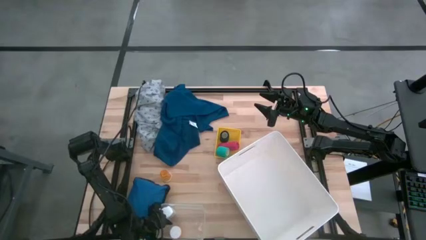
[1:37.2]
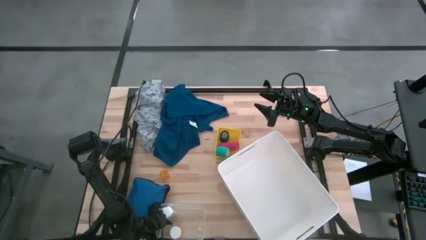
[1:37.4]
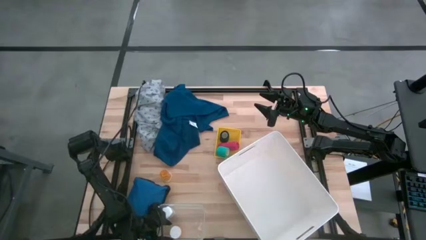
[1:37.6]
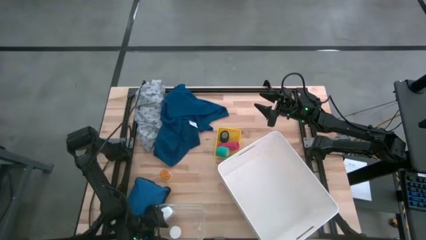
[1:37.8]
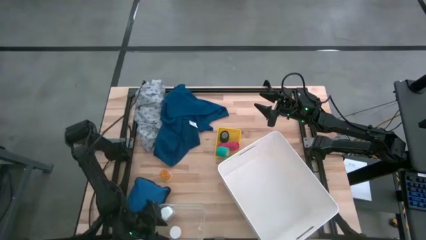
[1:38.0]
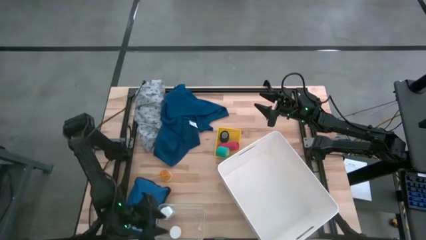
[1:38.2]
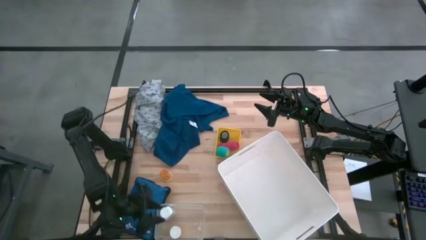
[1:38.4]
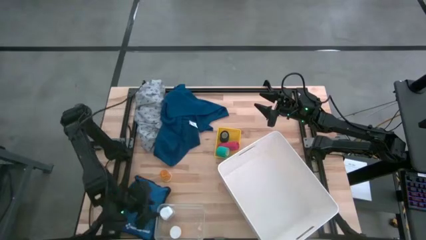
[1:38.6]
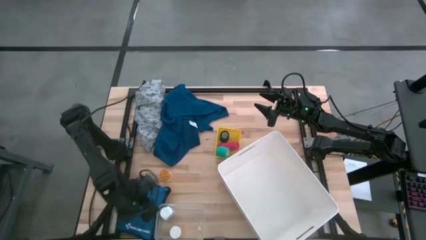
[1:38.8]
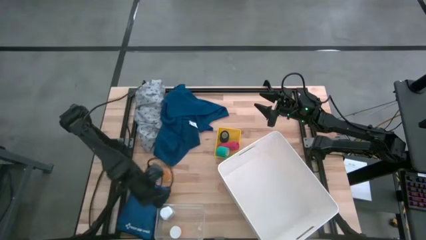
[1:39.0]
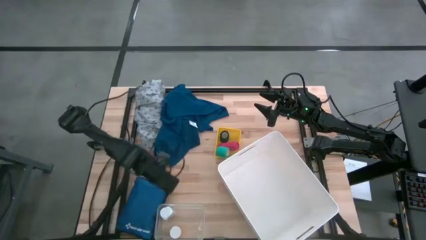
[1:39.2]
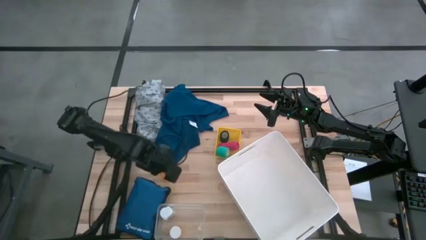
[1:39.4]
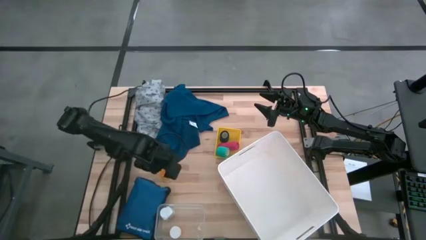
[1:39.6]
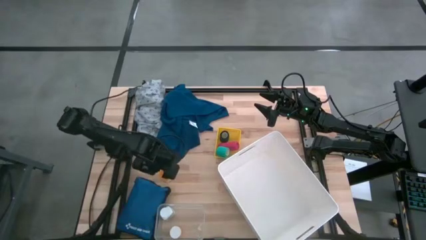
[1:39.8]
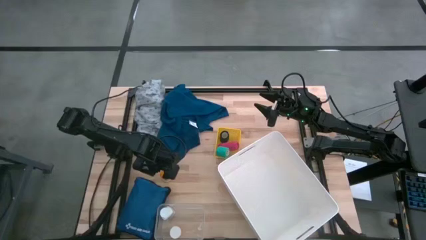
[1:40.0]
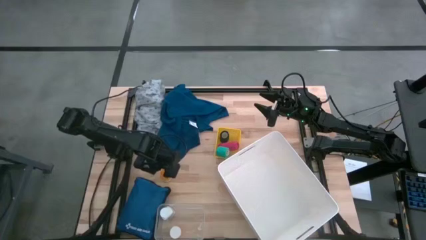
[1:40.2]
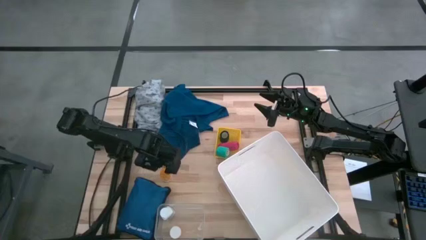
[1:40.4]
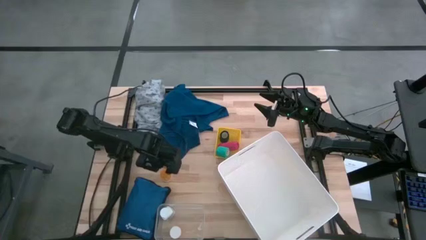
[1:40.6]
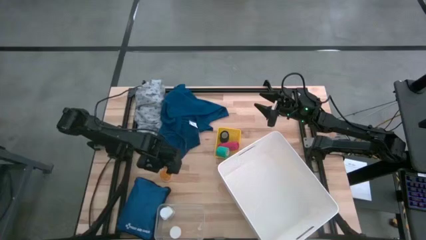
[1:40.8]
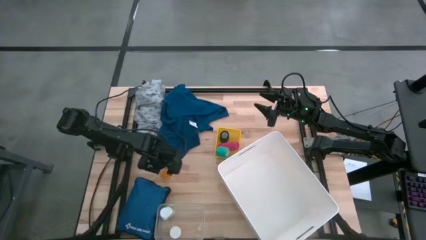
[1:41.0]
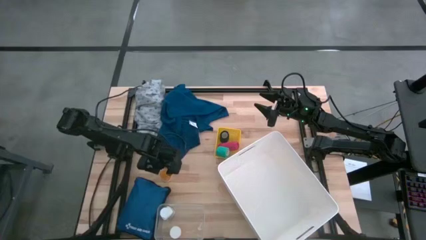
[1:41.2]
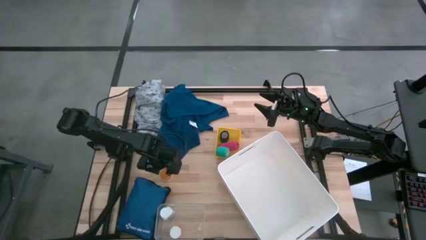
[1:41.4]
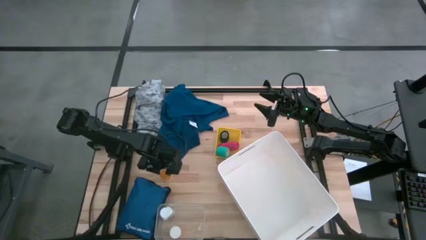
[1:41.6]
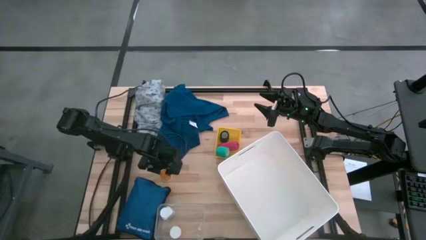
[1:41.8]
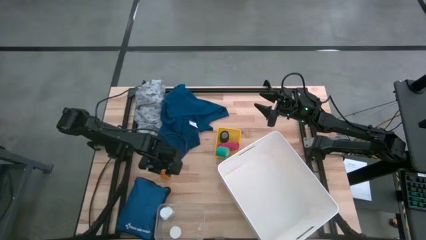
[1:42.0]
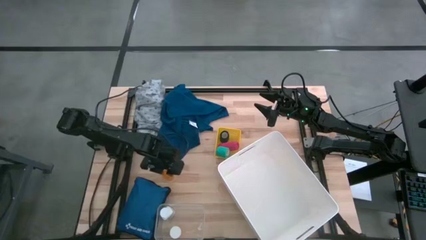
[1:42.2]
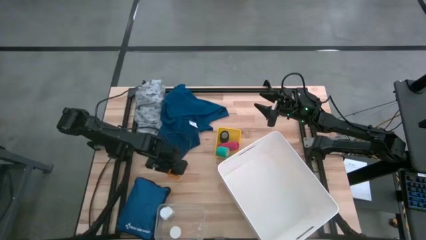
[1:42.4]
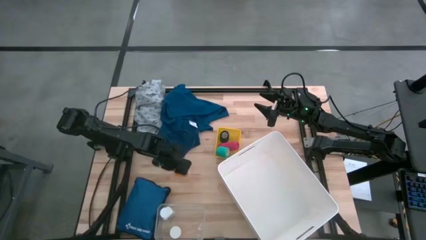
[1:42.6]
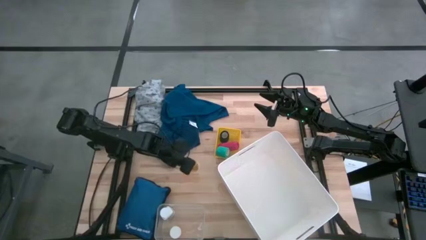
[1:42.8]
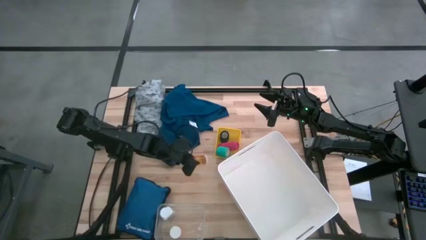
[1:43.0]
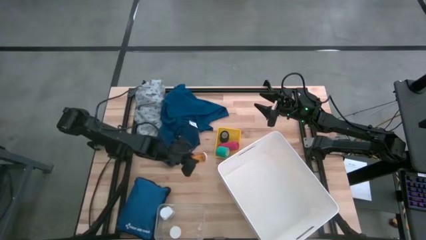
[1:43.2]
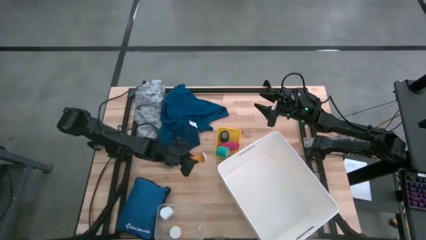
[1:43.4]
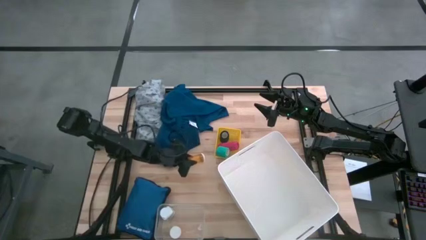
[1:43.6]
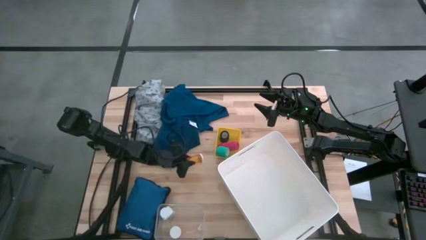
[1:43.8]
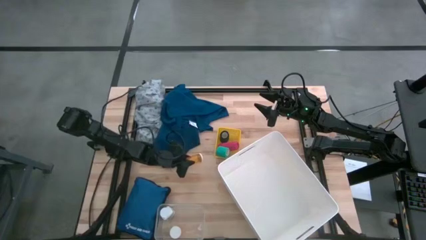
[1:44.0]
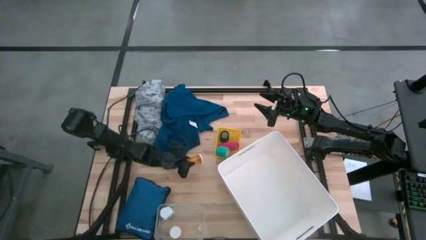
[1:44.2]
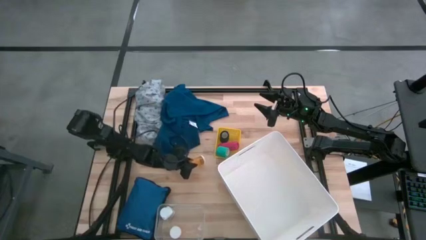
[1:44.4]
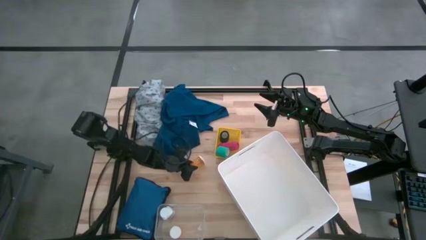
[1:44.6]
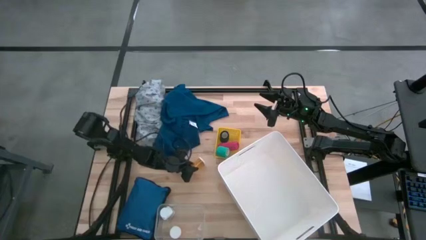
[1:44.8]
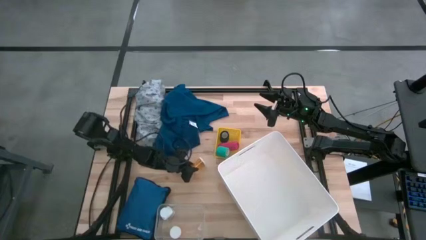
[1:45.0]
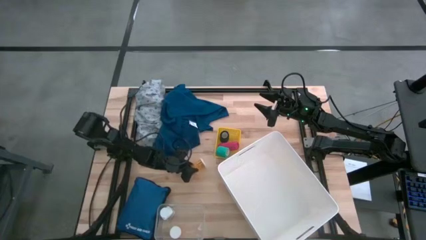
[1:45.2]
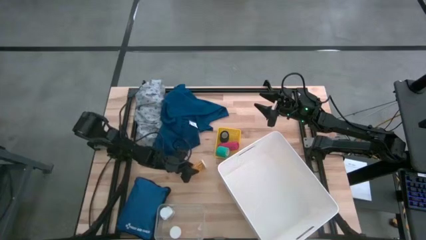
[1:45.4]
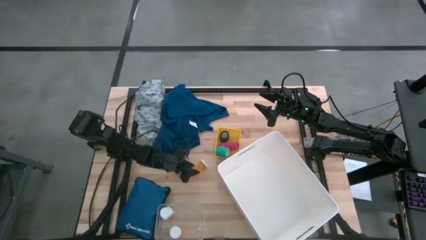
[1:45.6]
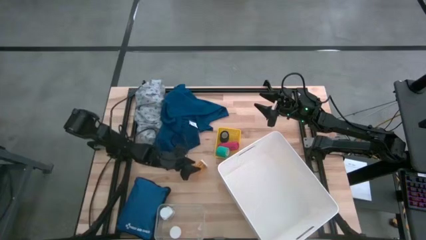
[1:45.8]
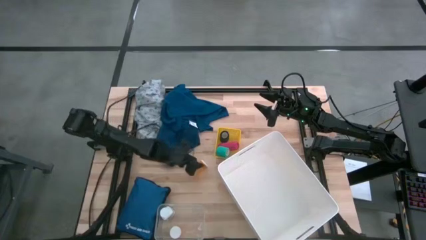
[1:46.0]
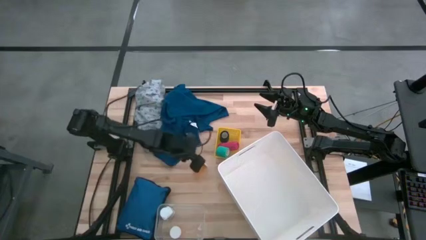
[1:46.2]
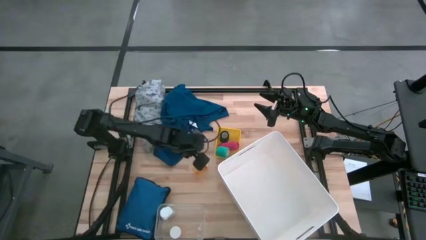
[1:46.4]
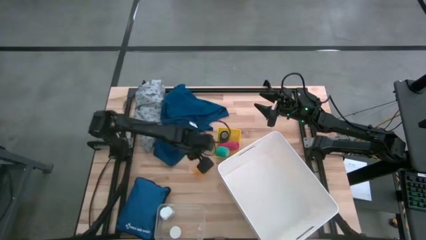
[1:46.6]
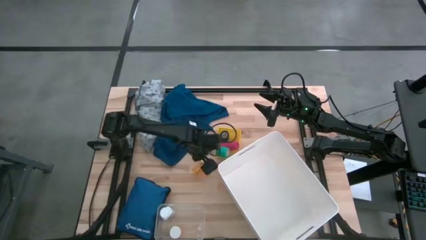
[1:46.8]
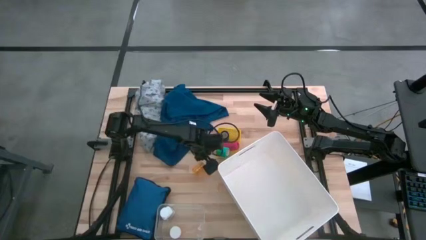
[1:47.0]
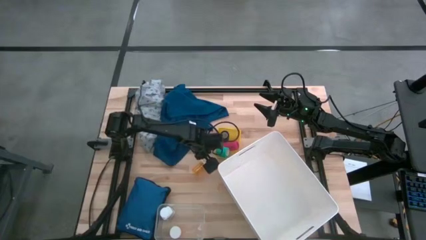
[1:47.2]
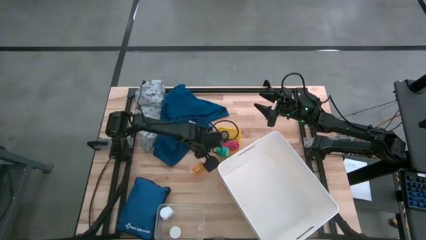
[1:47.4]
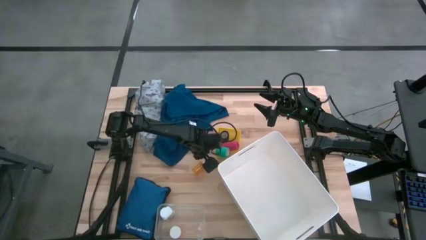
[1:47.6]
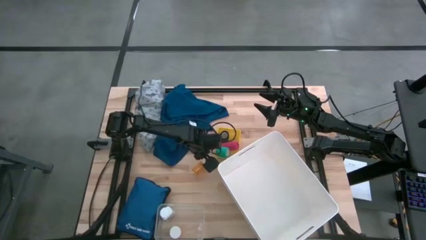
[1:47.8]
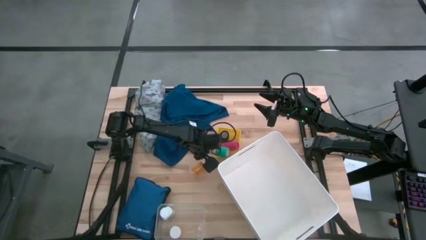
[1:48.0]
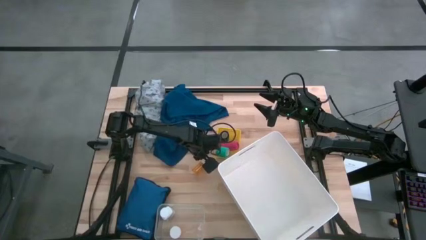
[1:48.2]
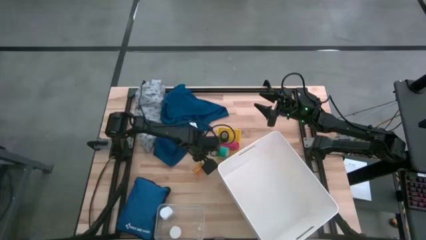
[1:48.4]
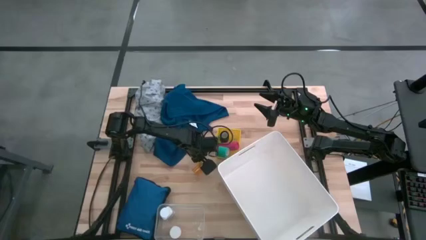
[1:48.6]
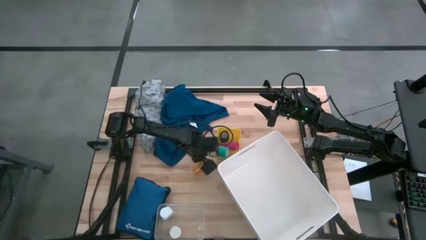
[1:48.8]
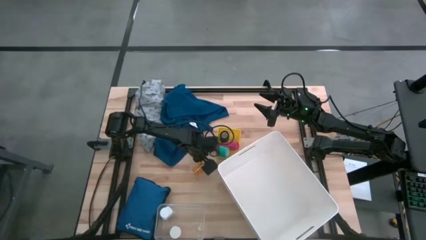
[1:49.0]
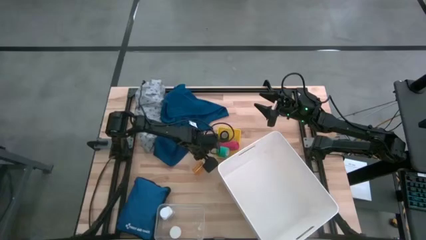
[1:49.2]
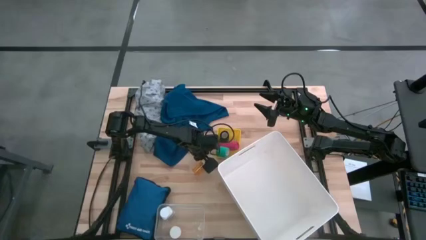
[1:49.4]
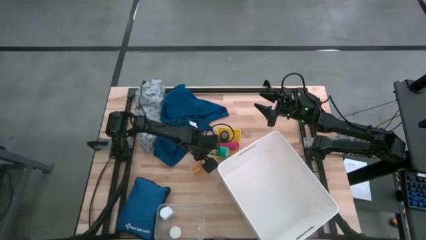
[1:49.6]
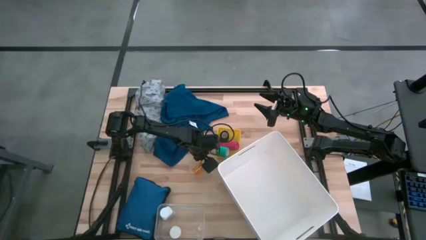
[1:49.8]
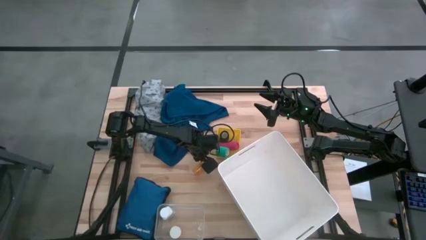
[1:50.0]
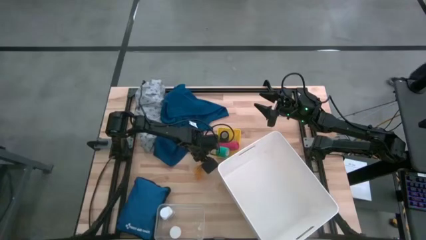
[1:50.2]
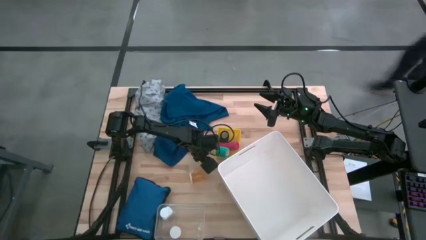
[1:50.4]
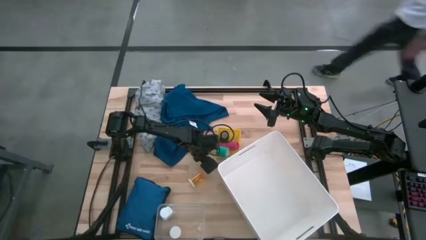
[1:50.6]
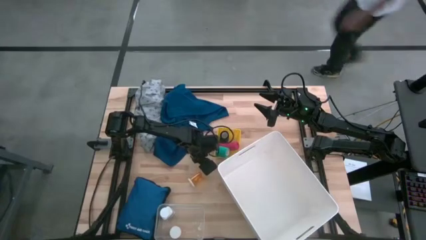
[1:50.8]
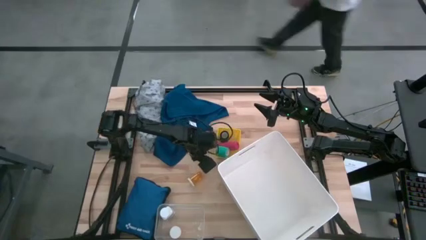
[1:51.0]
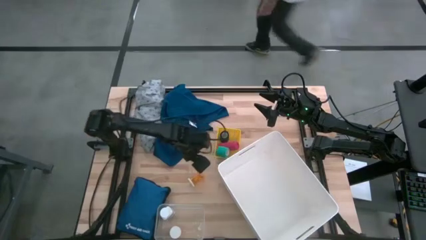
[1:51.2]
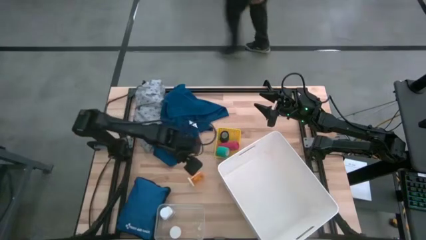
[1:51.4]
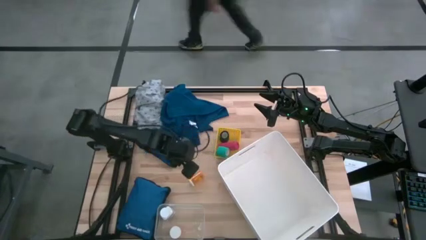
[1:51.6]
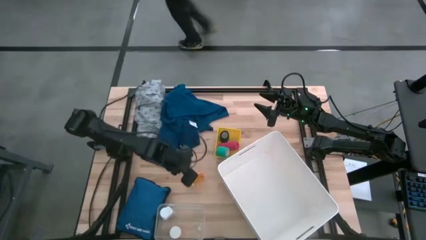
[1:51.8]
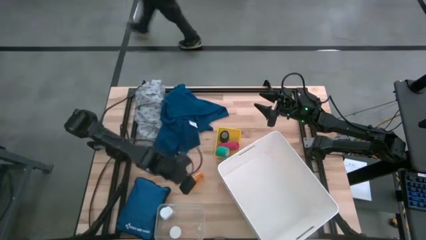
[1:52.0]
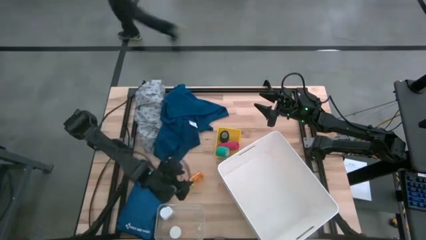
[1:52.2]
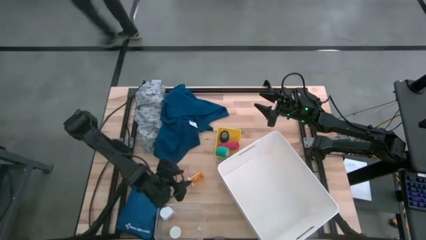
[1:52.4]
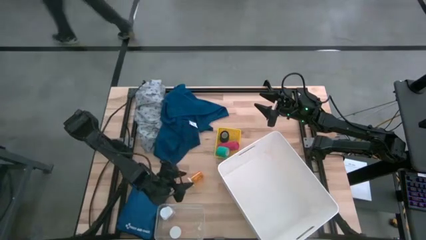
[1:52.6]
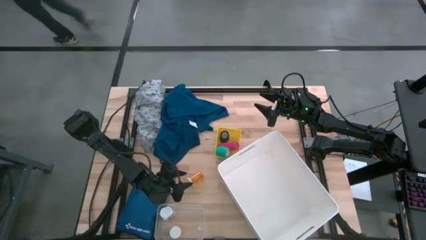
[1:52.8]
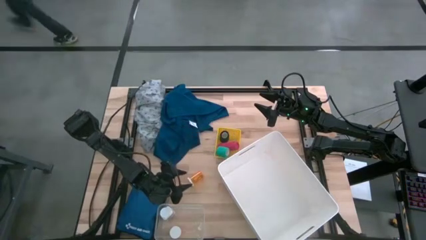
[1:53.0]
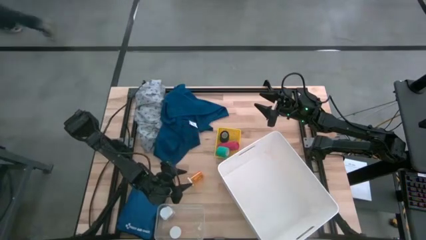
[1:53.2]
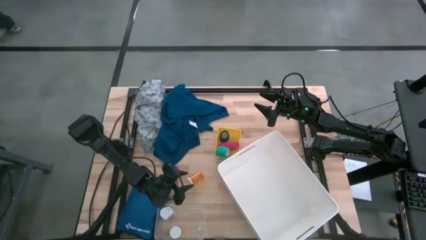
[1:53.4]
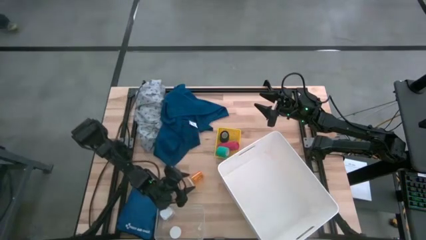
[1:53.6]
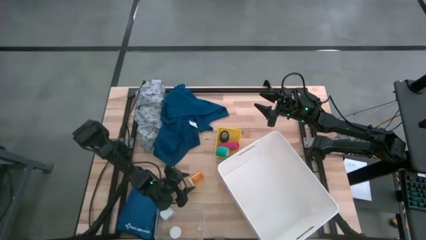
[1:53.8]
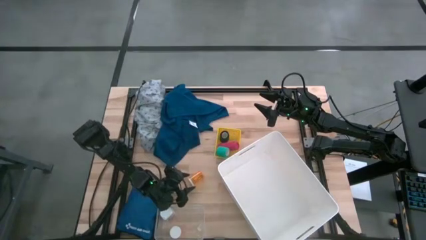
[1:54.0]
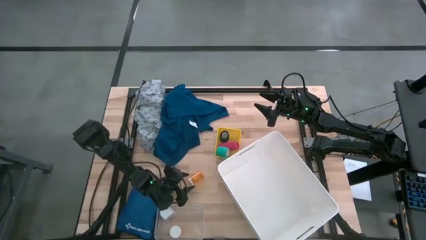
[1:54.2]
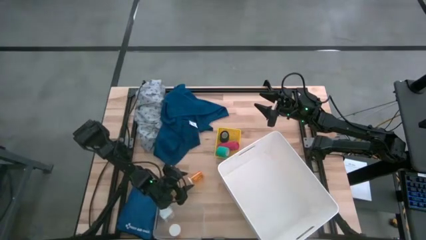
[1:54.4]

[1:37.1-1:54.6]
Task: Pick & place medical supplies in basket/bin
Put the orange pill bottle into the transparent bin
